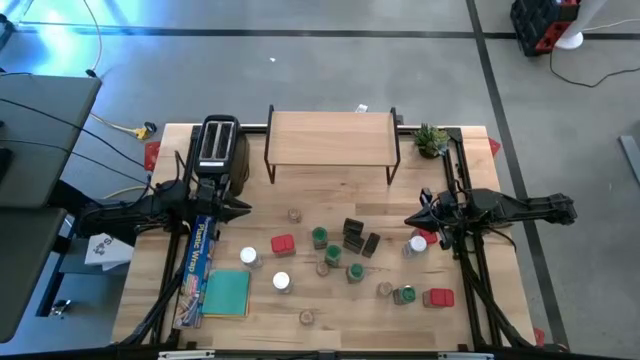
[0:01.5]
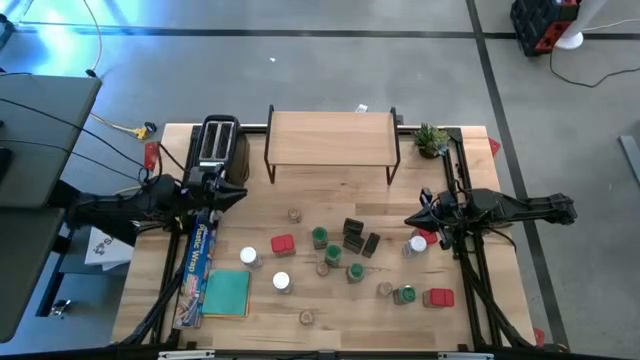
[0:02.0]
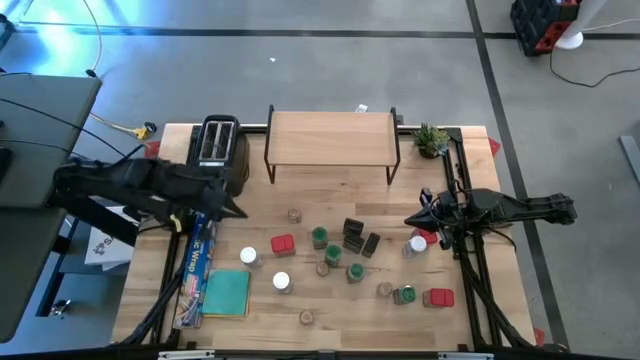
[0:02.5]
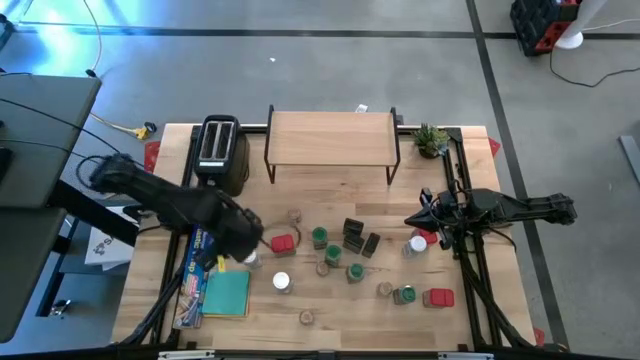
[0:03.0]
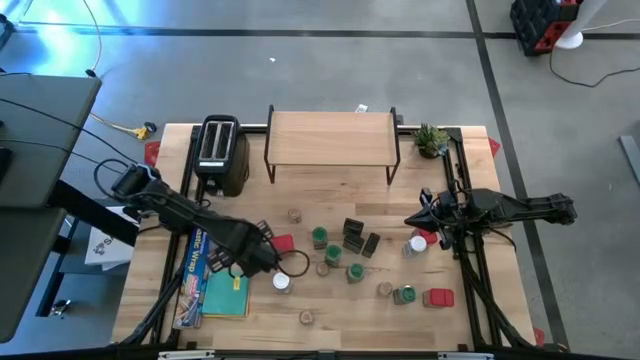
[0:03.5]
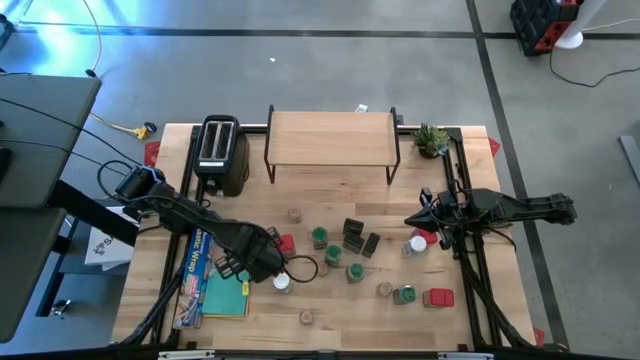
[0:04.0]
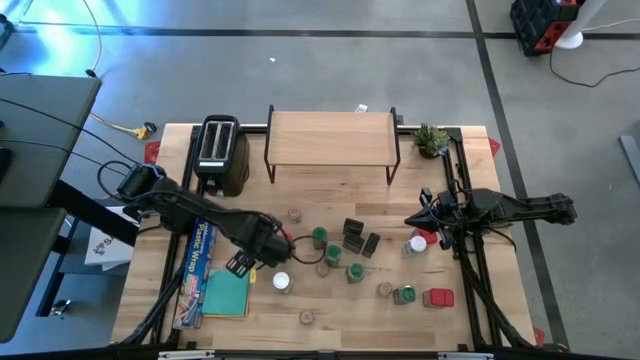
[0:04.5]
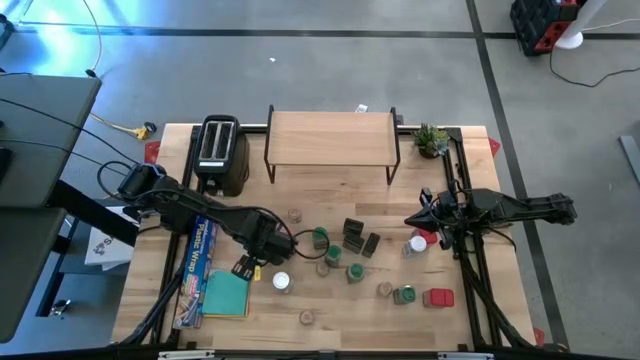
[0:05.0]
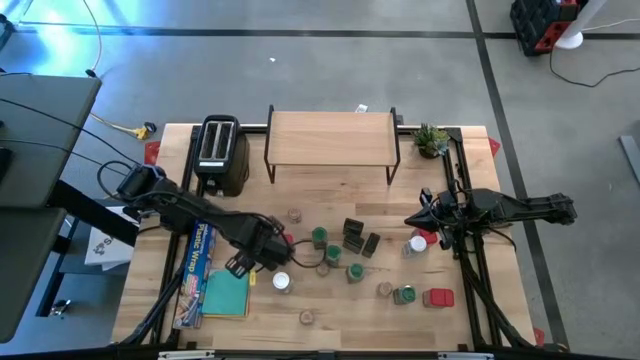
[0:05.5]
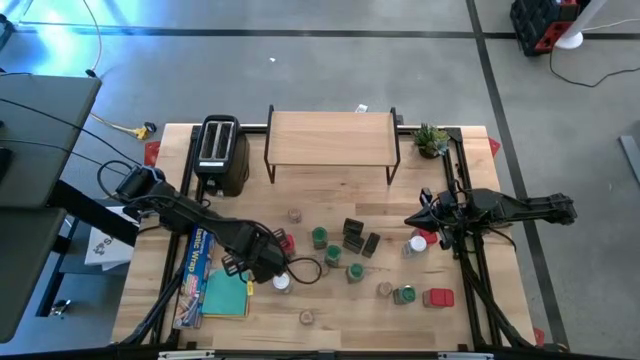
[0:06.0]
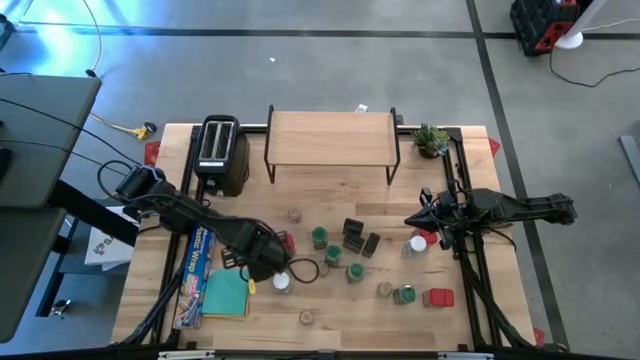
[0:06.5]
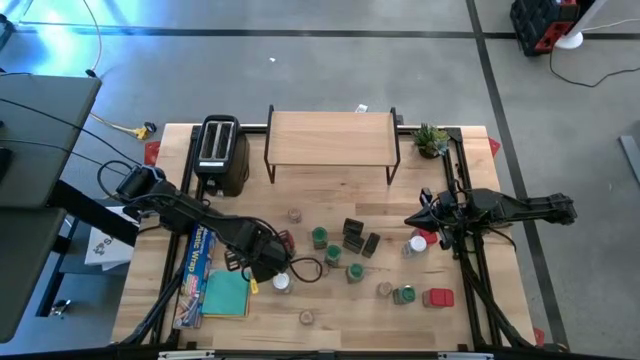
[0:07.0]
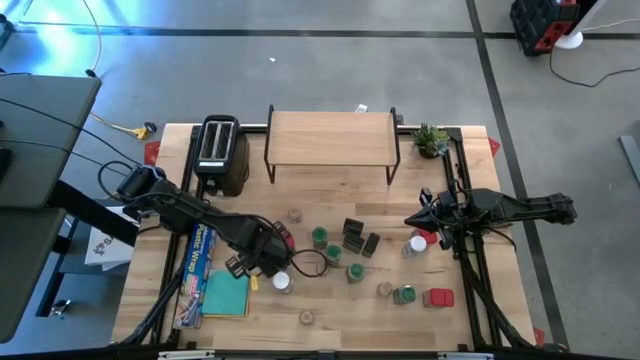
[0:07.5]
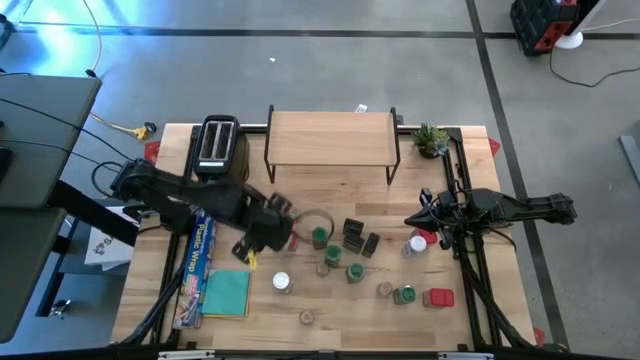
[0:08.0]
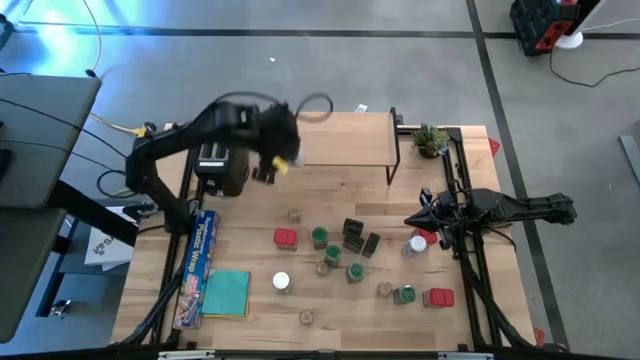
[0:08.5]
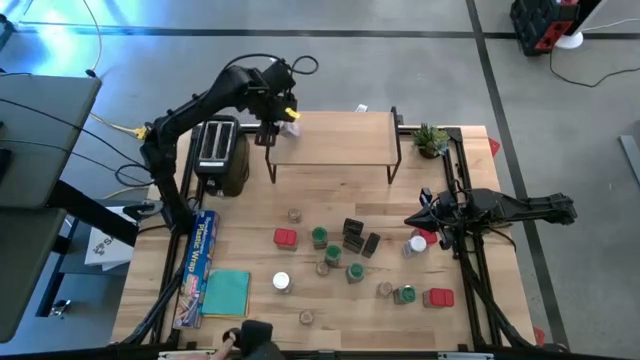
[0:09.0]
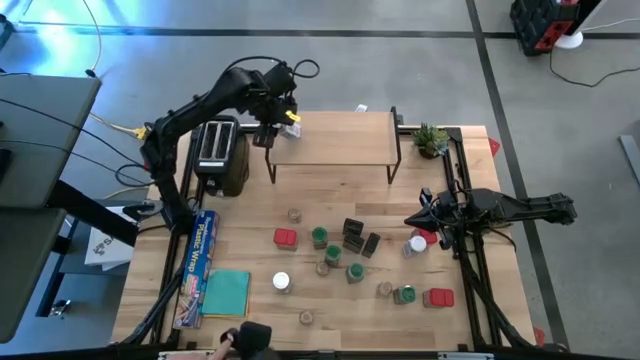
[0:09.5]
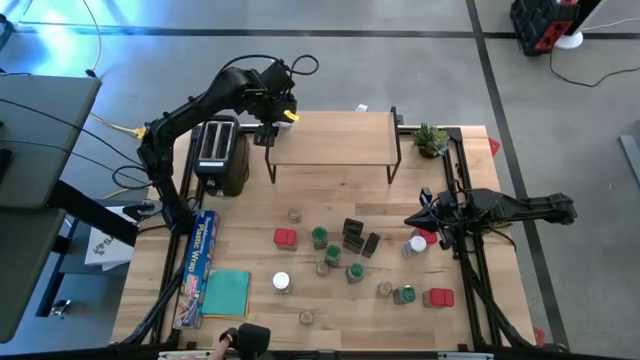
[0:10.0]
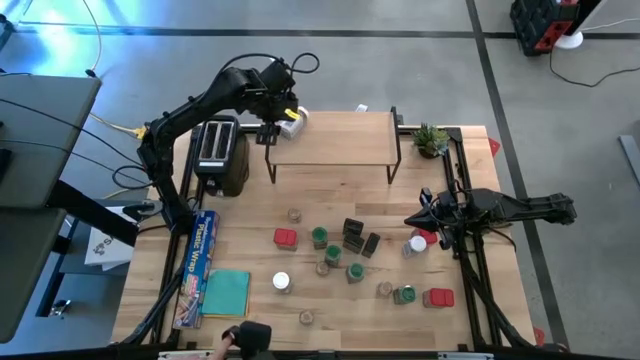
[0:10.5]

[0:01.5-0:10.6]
Task: Shelf spices
Put the top left white seasoning bottle on the shelf

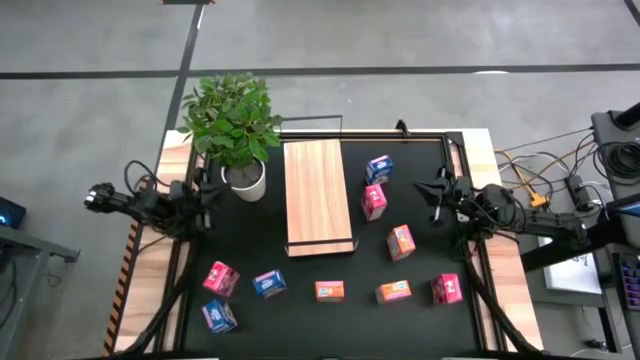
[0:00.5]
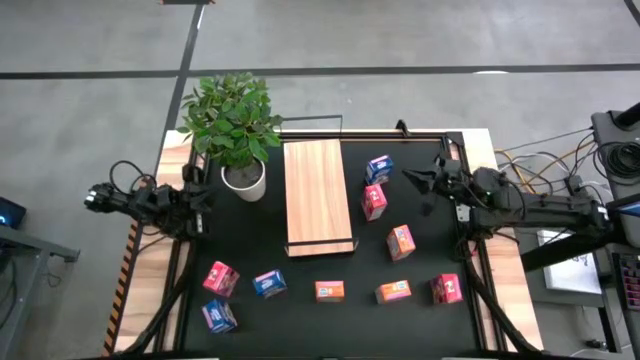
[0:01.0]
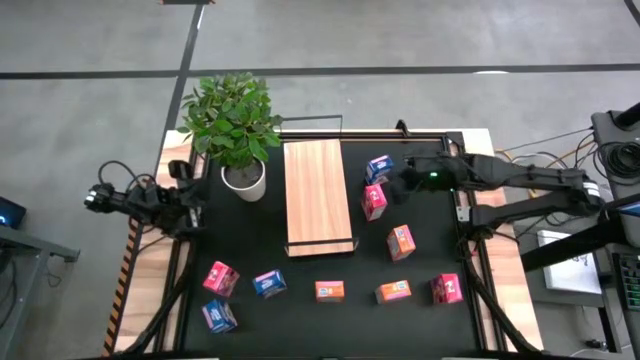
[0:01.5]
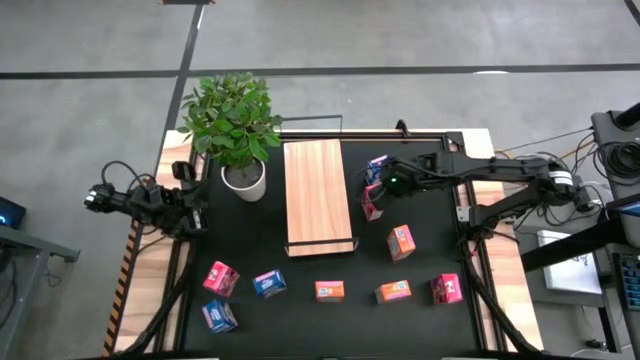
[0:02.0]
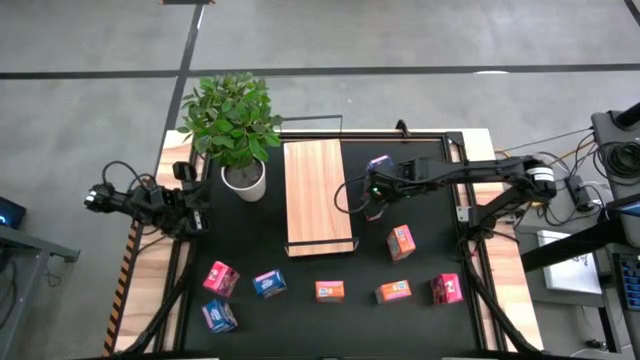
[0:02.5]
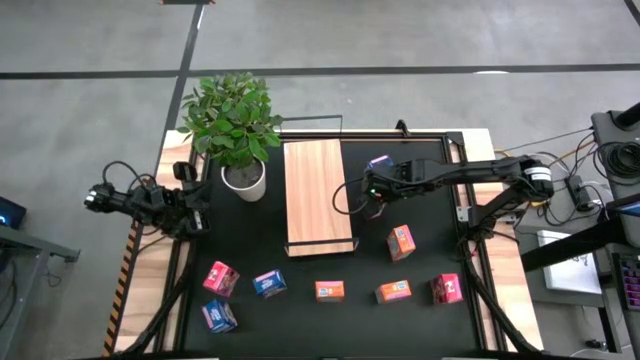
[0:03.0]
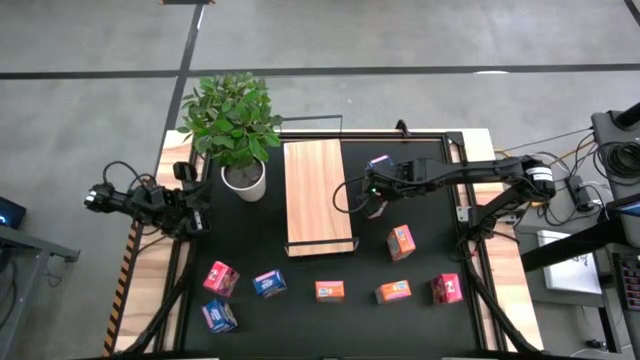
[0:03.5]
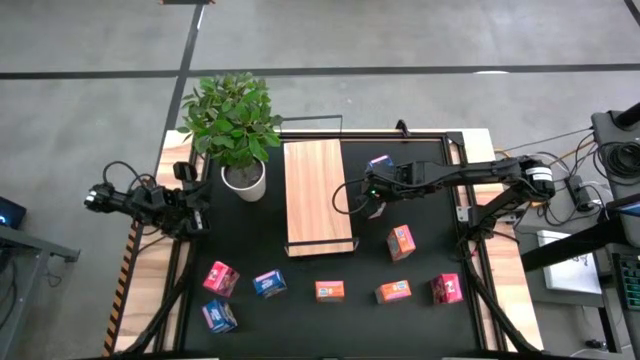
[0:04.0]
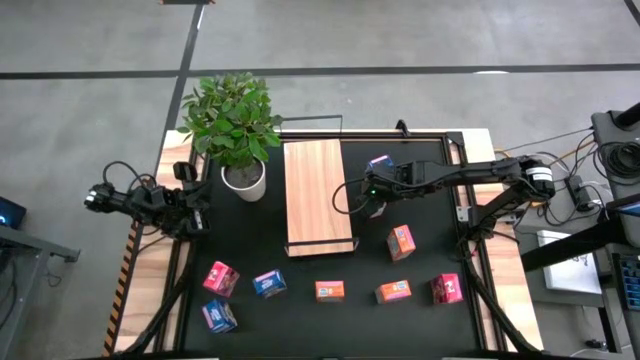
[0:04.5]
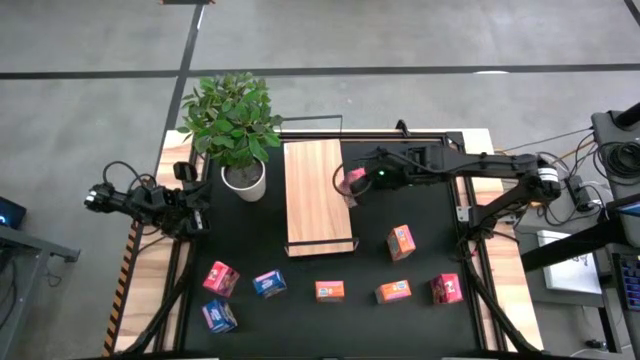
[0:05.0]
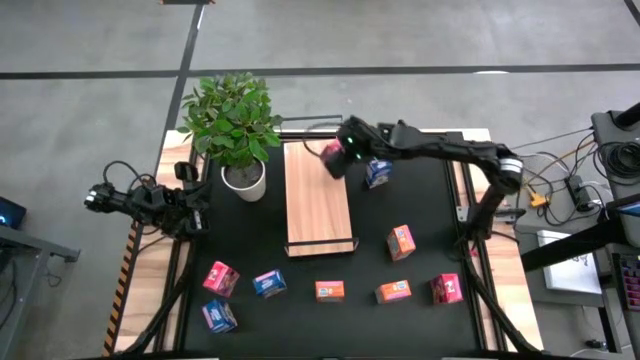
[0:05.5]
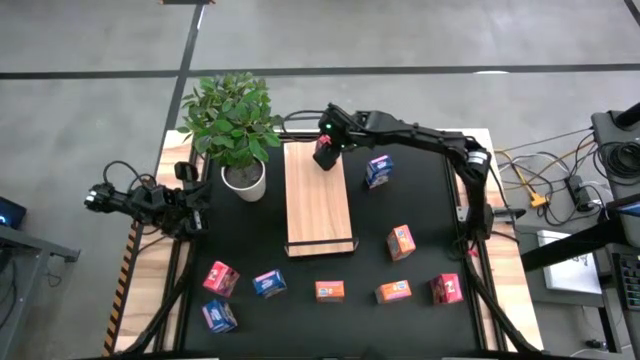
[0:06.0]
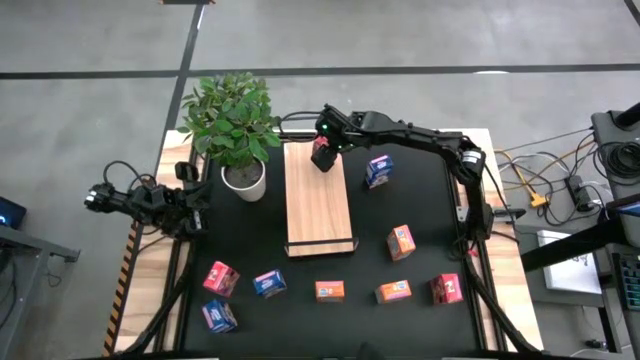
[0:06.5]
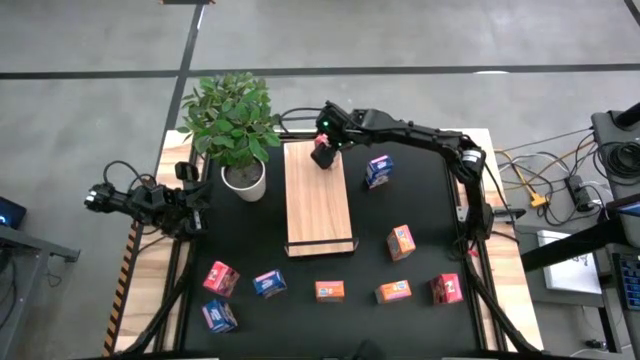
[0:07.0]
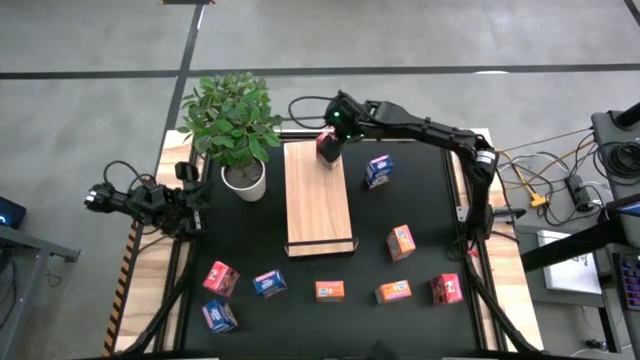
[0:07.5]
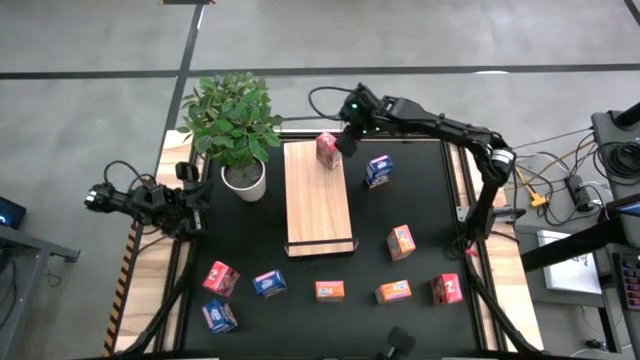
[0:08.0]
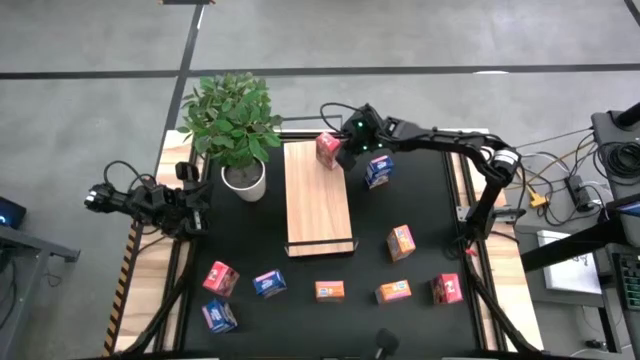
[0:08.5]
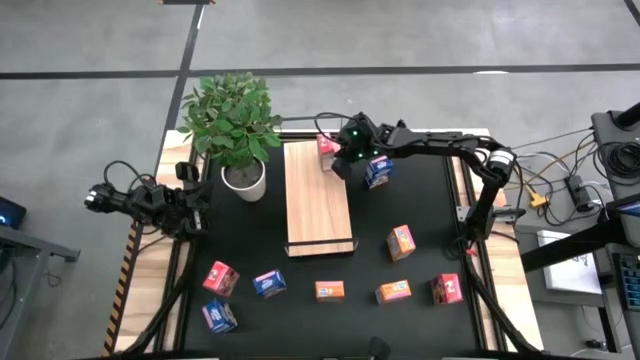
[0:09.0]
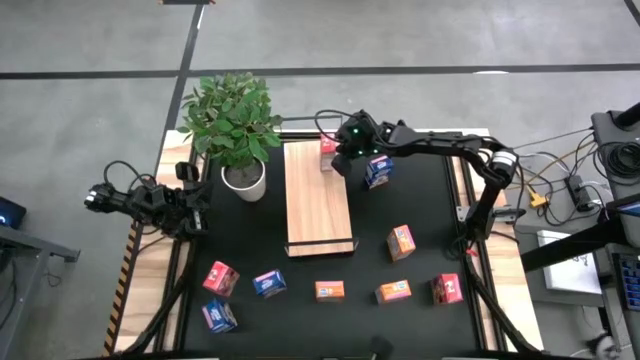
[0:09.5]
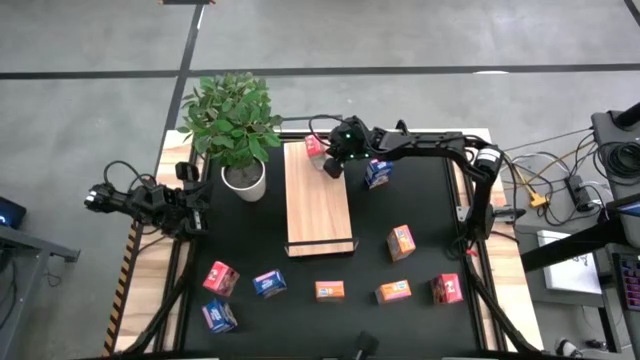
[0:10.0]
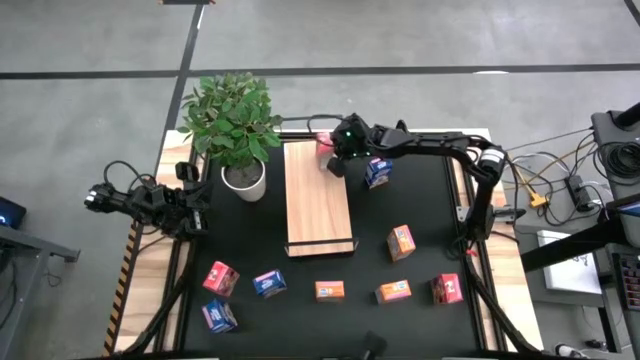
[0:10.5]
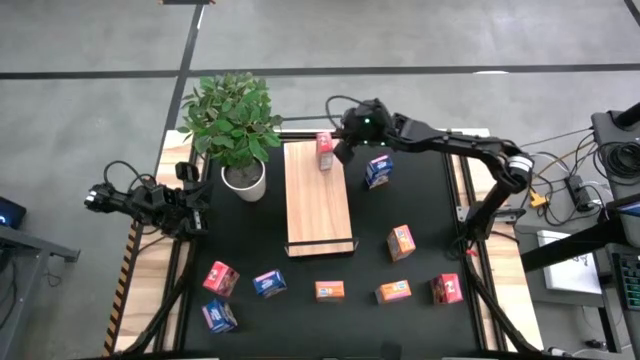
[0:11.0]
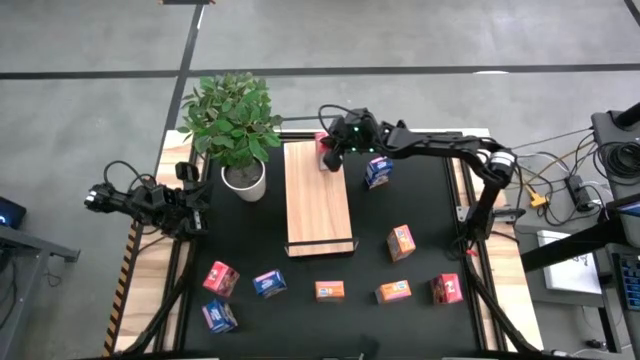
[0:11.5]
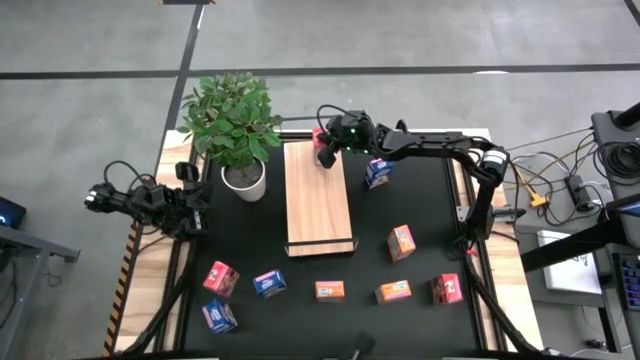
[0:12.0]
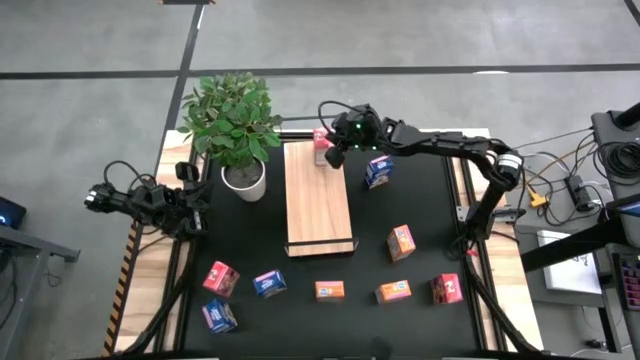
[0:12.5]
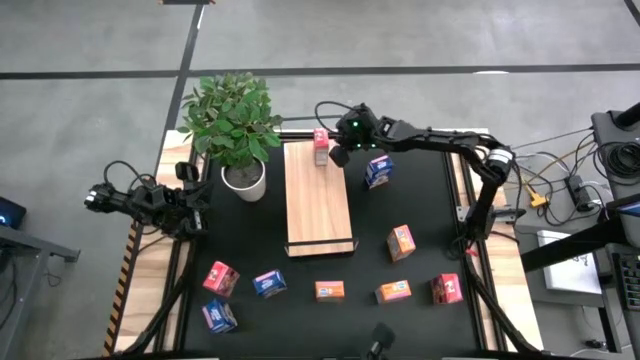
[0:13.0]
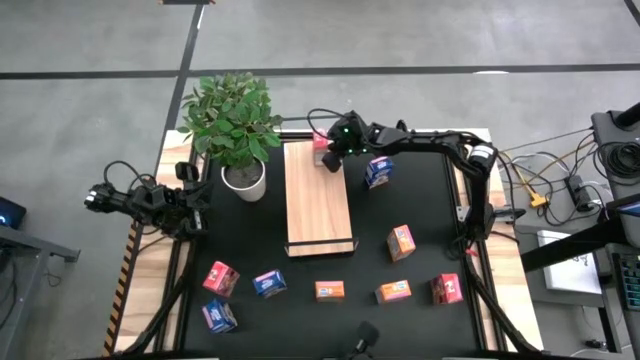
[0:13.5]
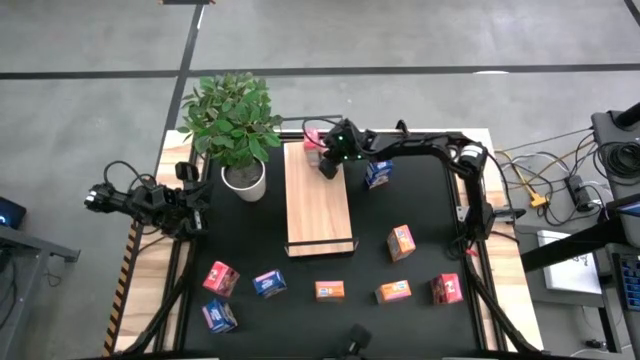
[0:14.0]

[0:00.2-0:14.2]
Task: Stack cereal on shelf
Put the top red cereal box on the shelf
